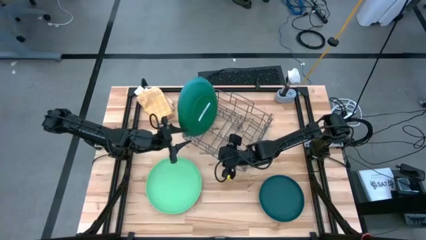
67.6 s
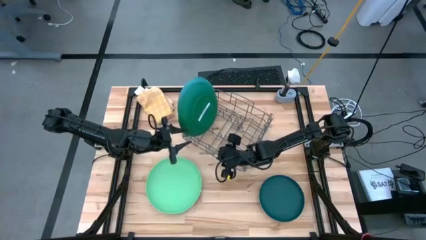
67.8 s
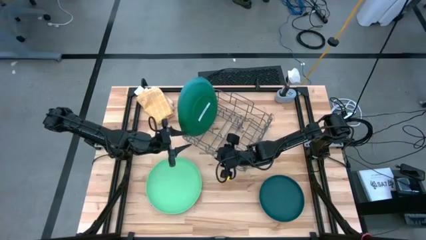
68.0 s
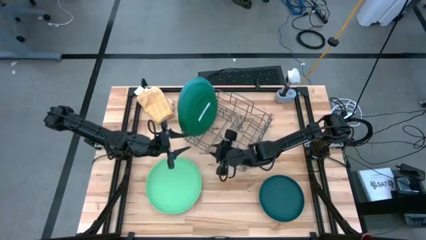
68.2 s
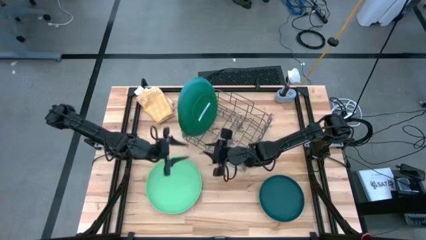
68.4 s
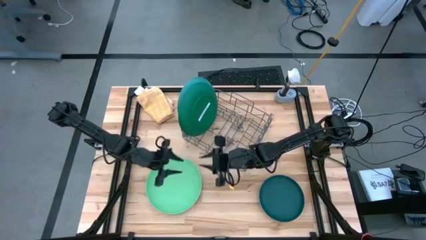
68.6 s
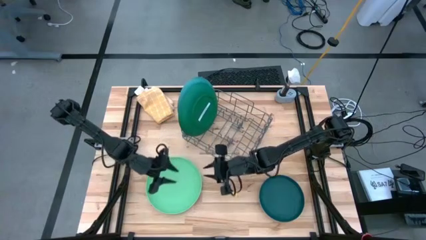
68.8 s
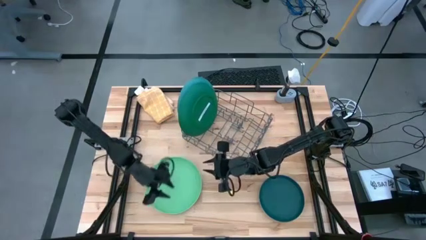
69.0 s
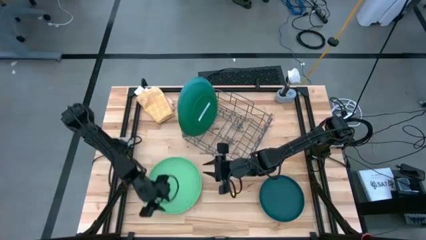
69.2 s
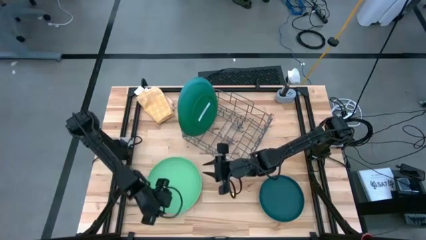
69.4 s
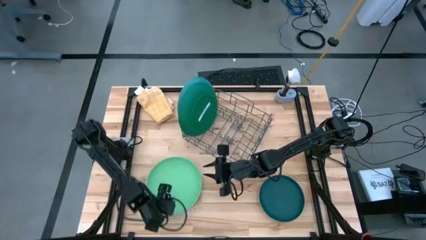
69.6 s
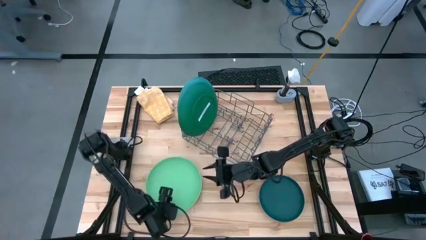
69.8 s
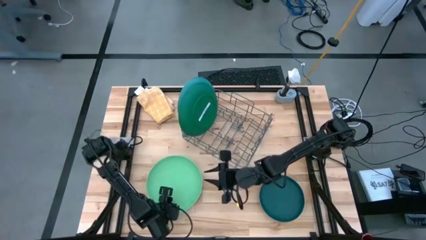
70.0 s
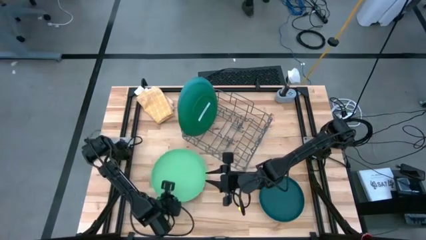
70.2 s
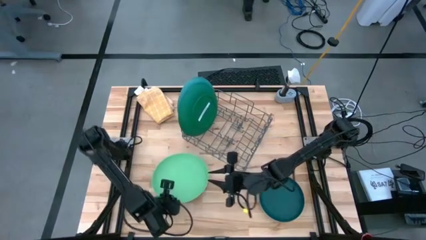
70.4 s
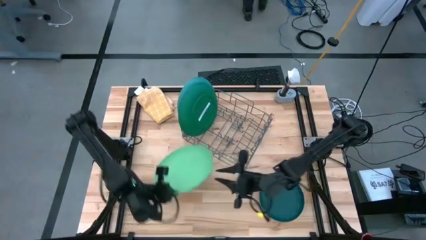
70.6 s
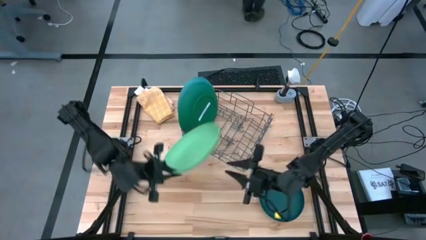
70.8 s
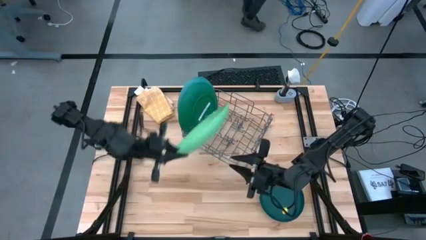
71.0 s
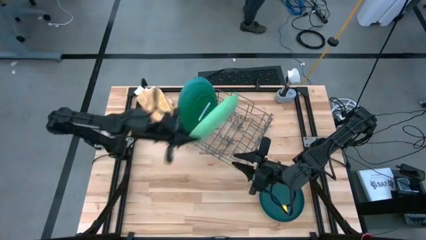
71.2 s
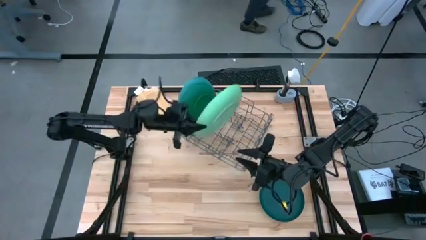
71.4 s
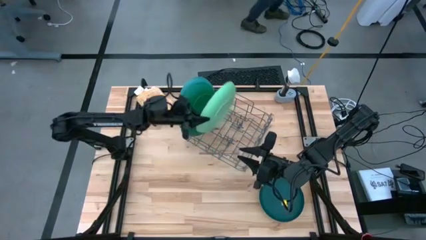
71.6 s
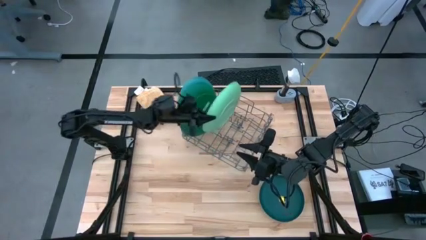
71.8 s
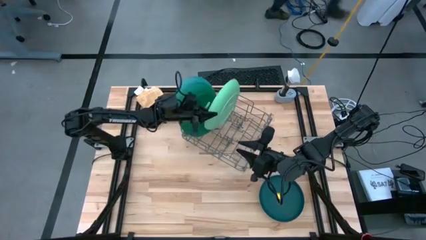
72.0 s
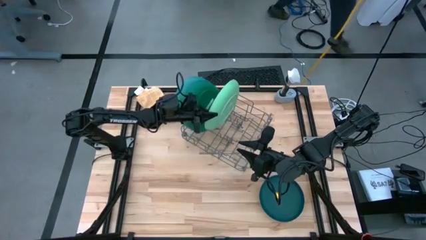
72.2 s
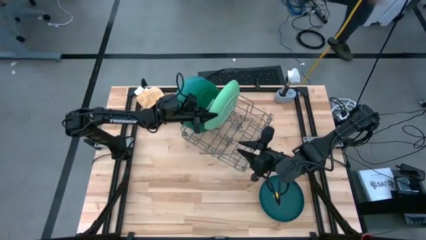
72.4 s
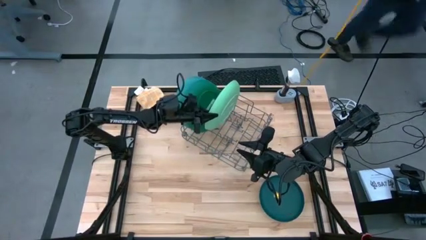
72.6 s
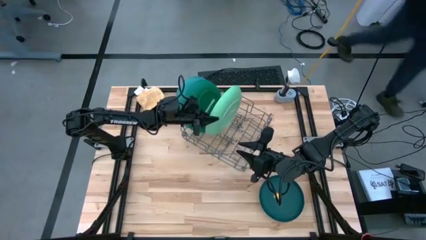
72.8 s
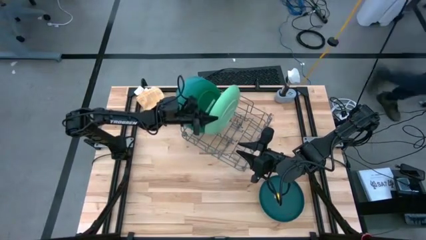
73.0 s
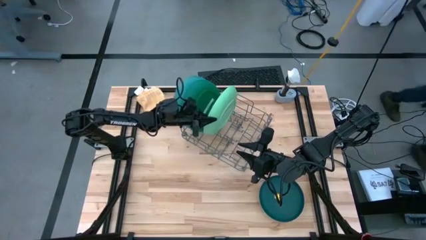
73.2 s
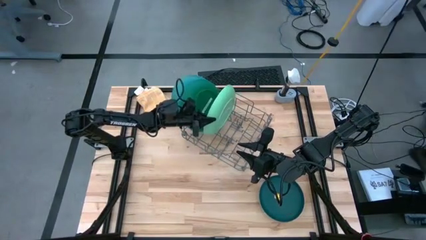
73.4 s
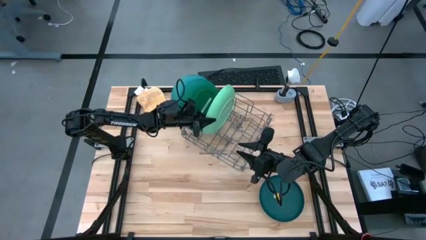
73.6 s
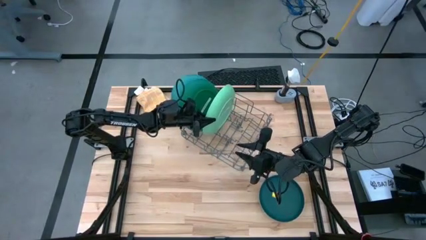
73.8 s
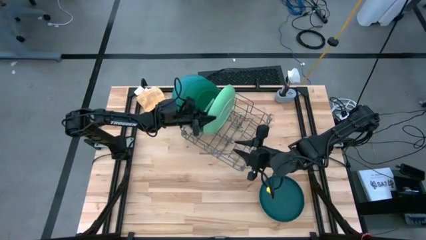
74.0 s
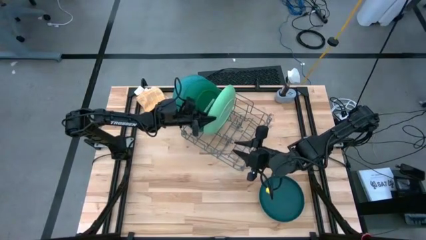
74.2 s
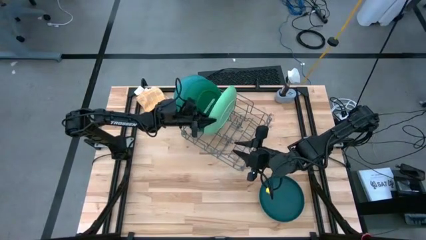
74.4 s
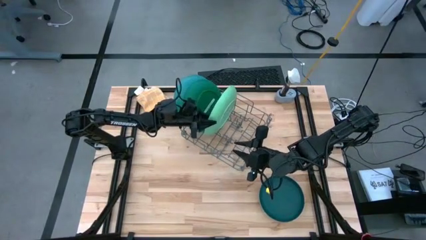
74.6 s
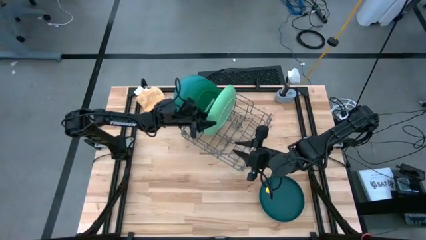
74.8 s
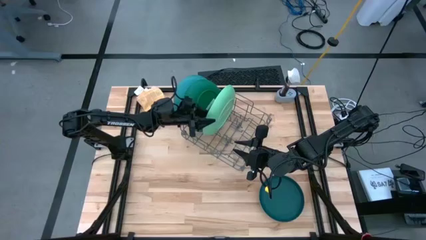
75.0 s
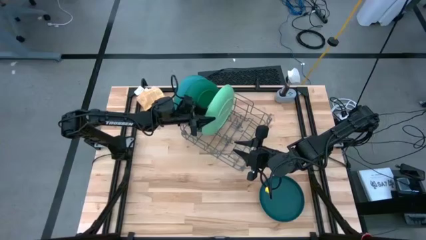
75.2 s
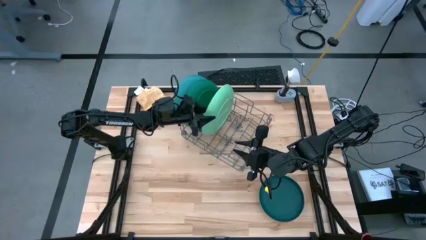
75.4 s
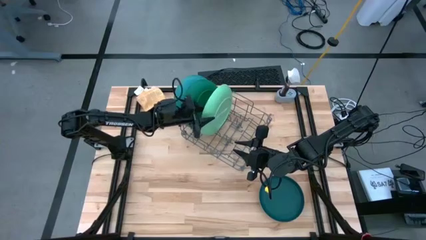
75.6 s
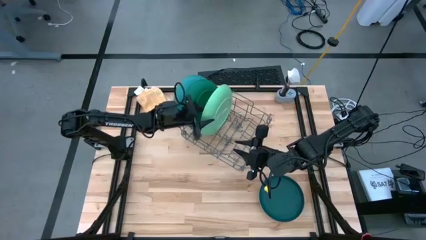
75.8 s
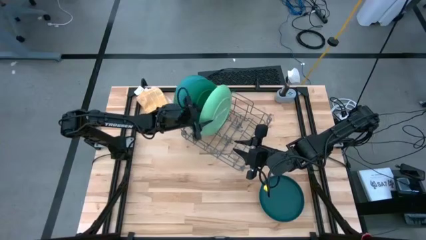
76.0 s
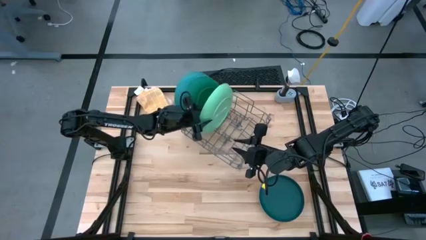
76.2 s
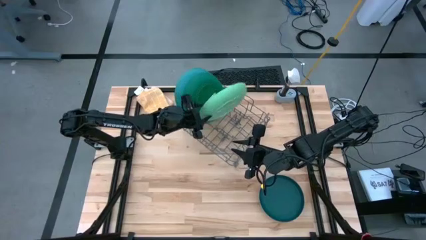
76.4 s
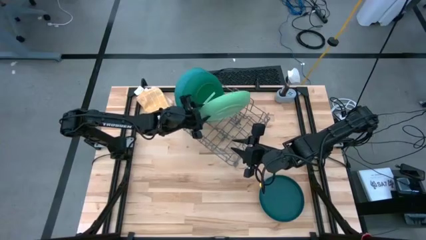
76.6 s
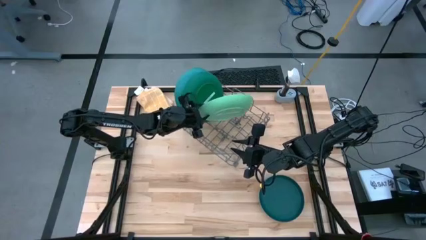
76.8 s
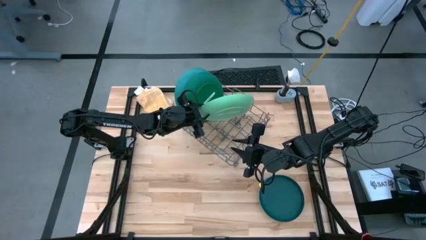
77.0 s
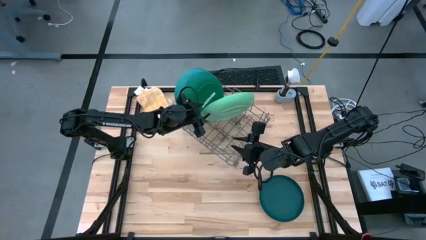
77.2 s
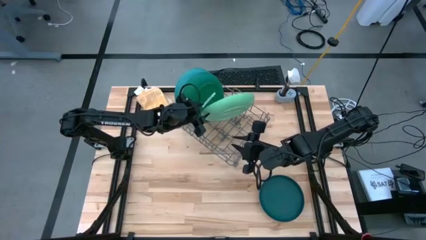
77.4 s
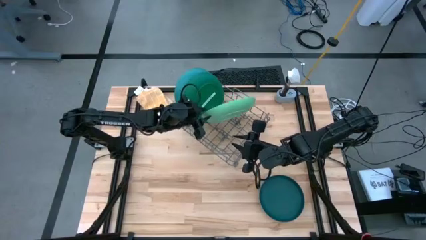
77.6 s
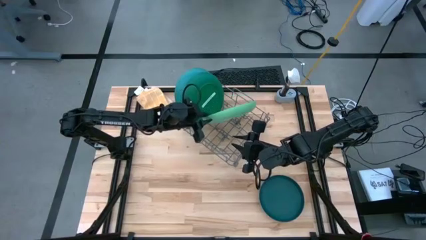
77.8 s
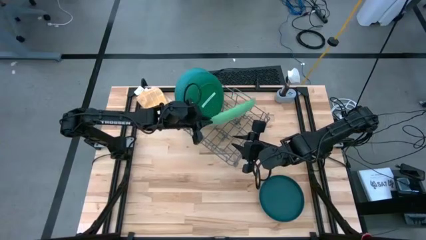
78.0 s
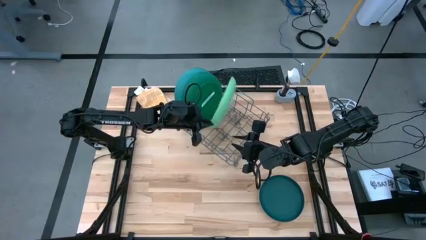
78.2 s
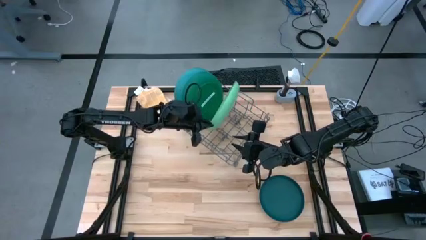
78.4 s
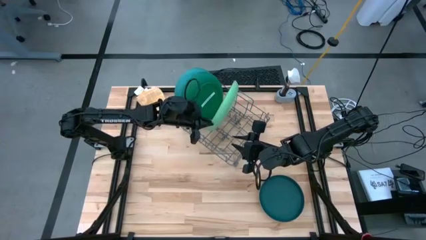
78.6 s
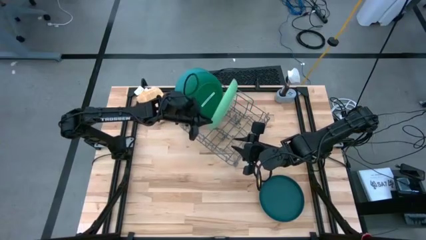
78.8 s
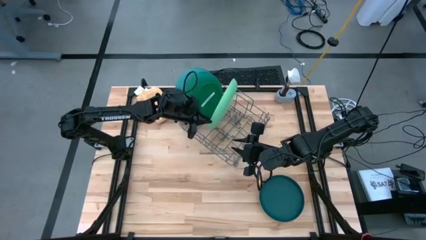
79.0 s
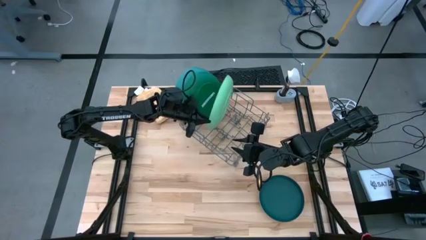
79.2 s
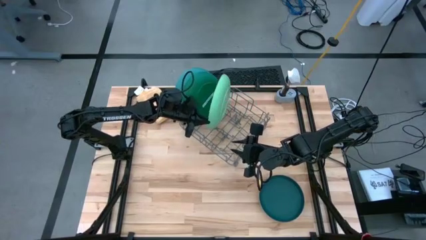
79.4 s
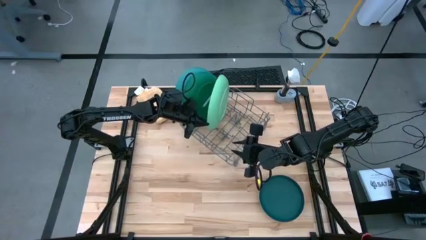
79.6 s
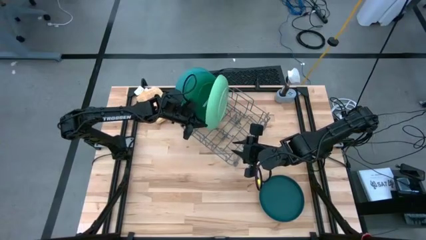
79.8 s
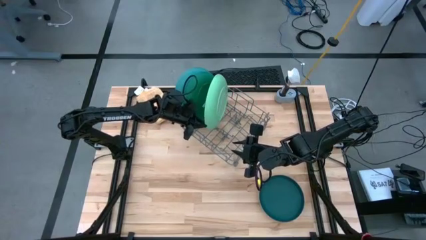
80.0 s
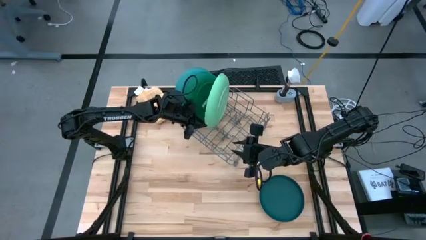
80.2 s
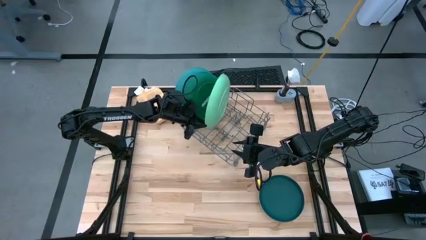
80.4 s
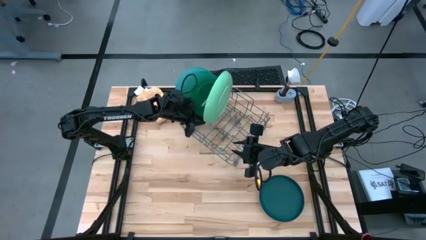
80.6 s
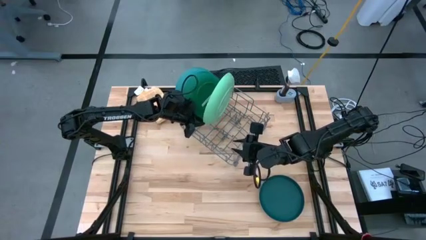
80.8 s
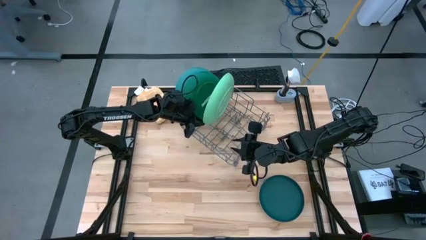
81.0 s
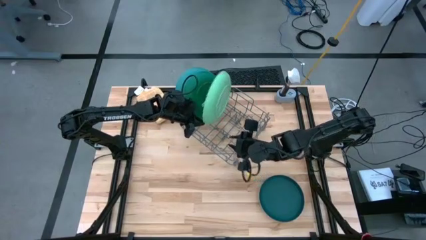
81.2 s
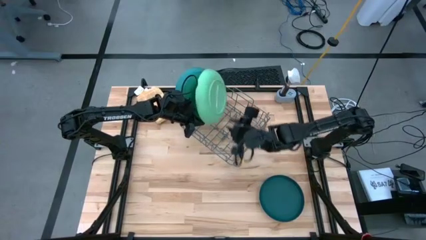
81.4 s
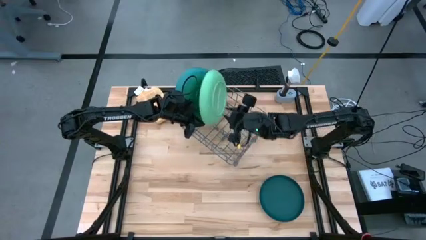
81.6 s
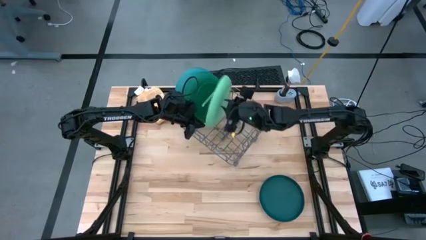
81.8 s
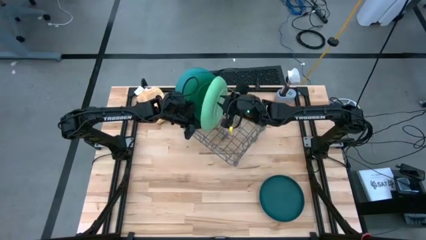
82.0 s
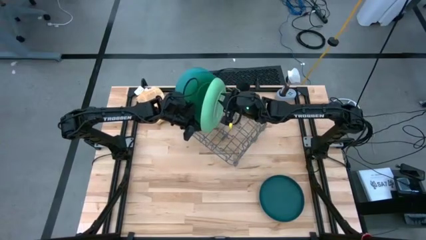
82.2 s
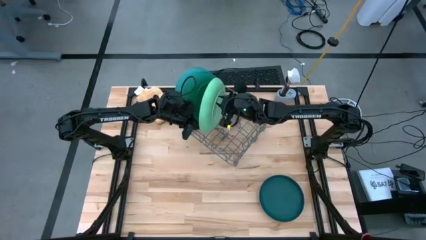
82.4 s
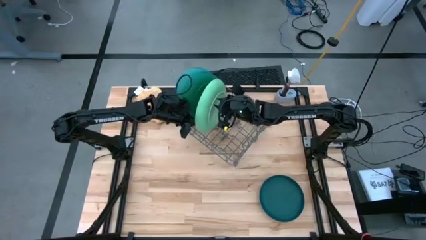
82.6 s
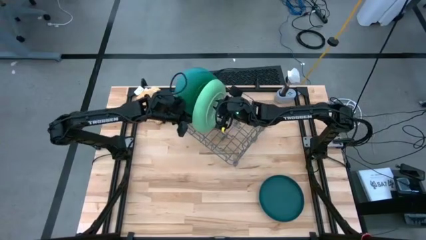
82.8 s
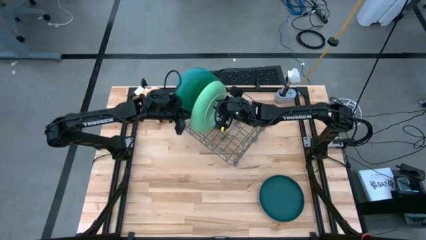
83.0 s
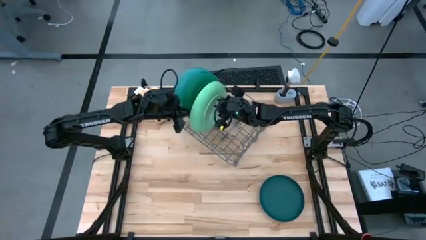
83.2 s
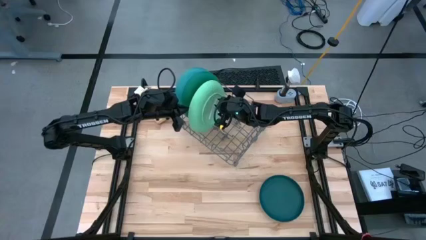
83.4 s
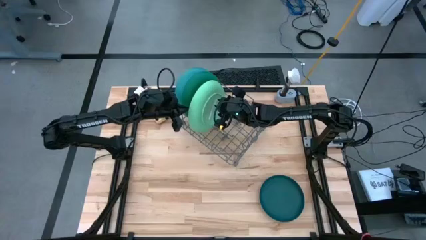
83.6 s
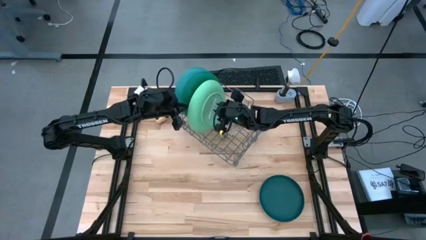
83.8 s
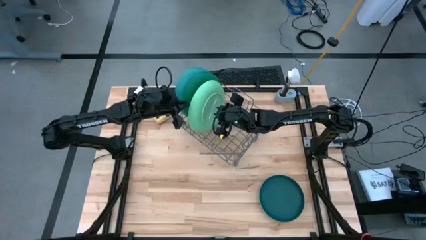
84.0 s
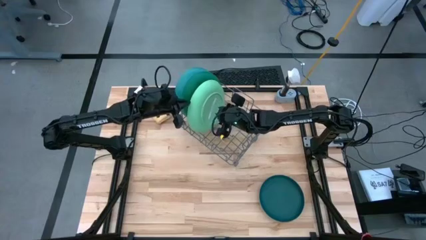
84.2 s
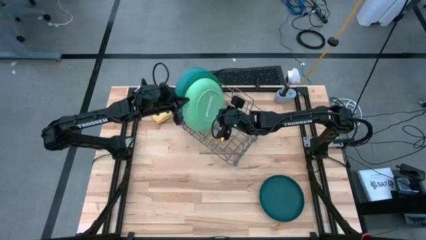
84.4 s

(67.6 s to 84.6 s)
Task: Sort dishes
Put the light green plate into the dishwasher rack
